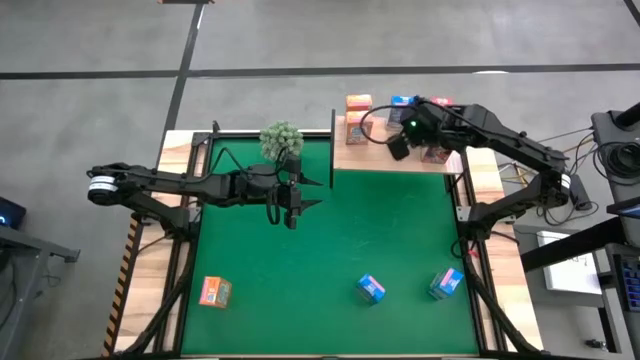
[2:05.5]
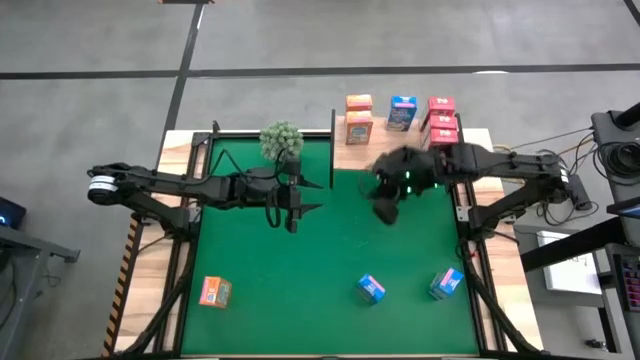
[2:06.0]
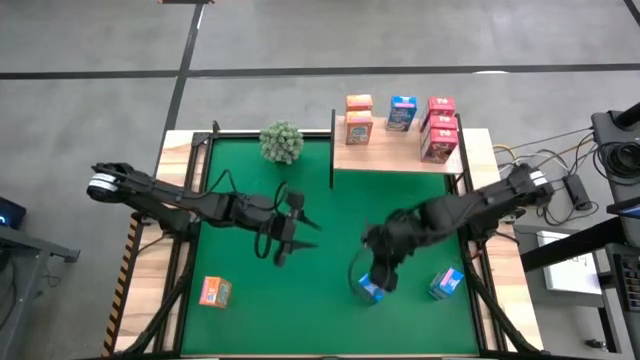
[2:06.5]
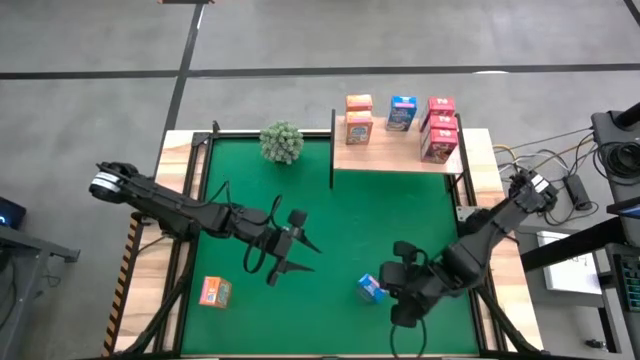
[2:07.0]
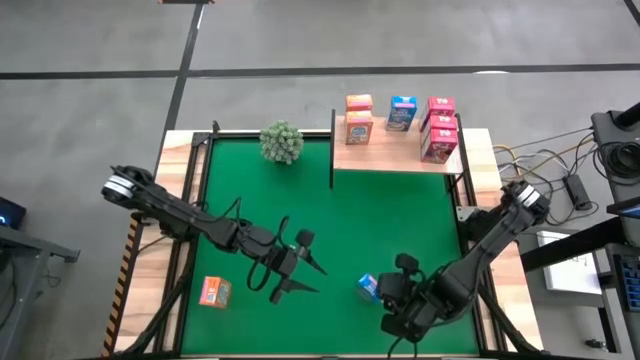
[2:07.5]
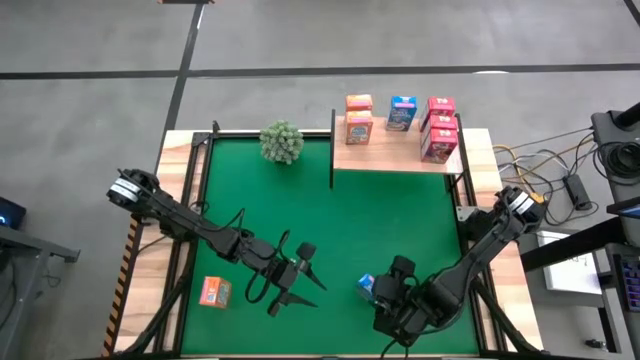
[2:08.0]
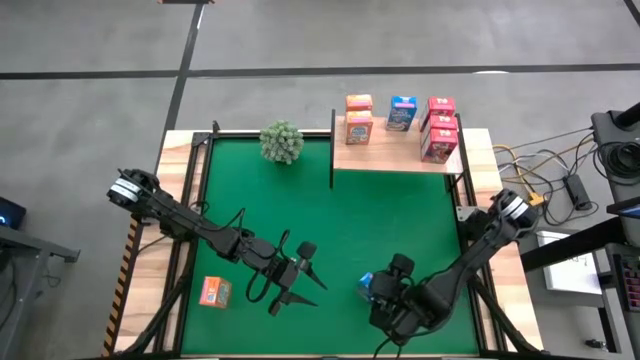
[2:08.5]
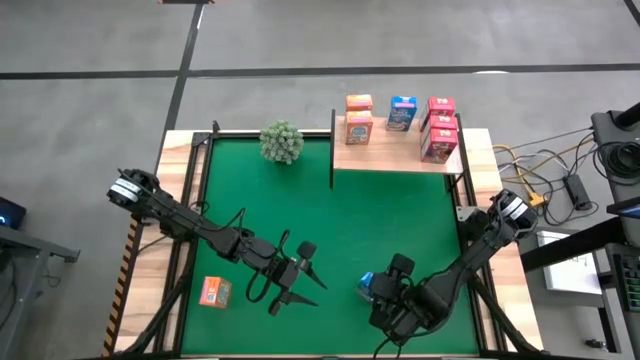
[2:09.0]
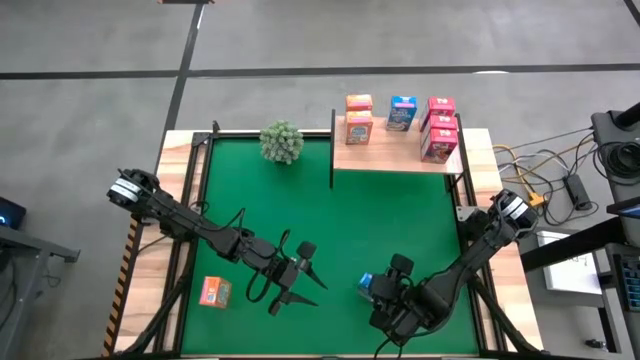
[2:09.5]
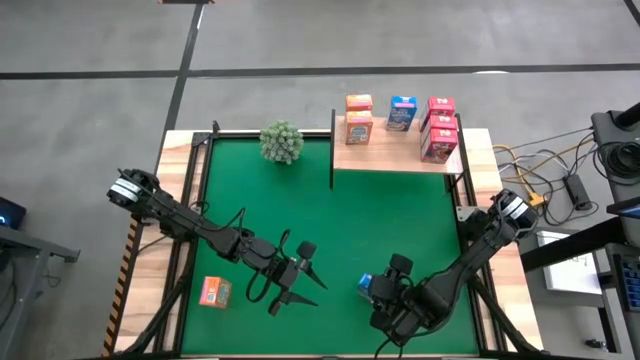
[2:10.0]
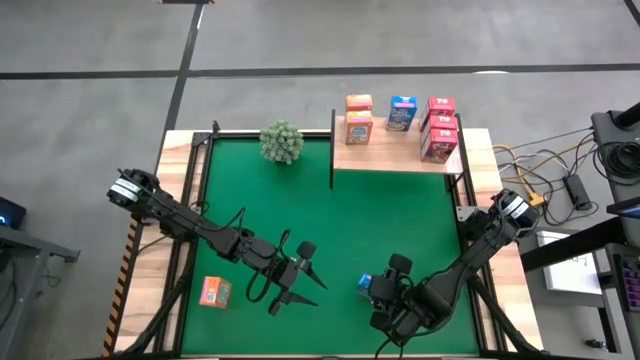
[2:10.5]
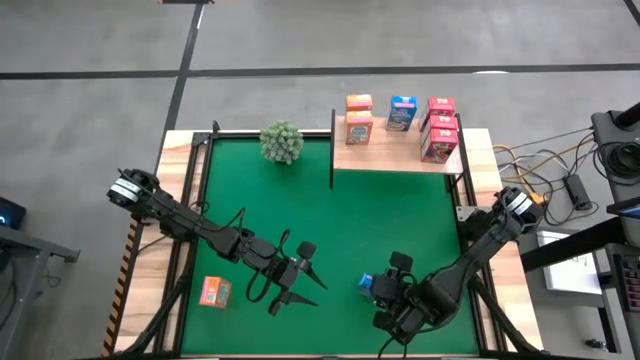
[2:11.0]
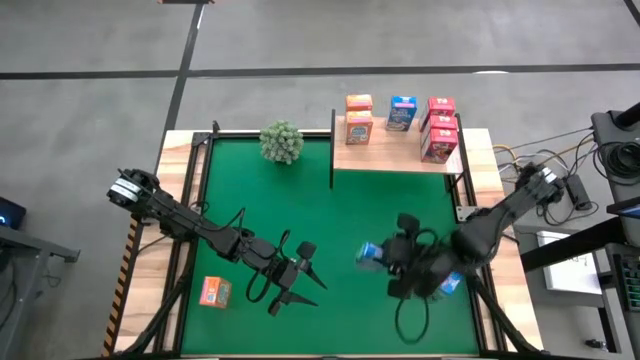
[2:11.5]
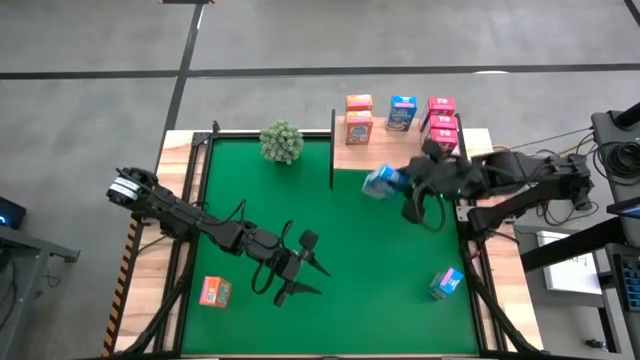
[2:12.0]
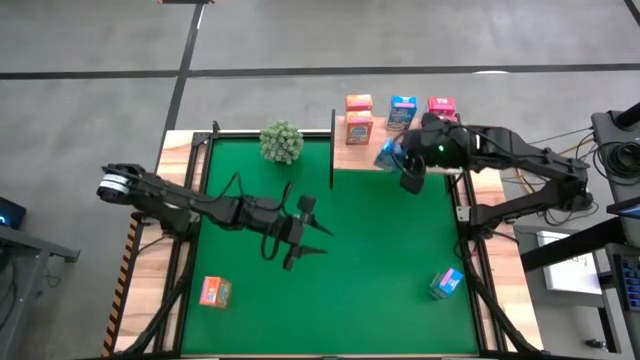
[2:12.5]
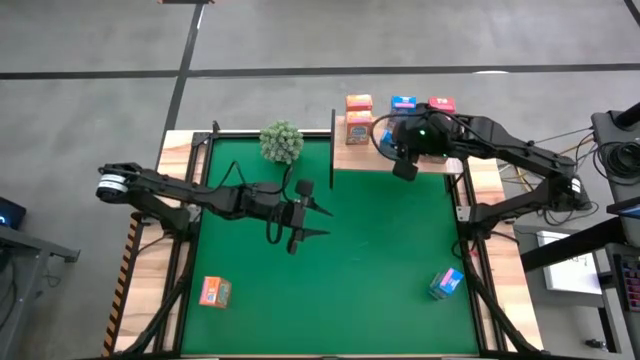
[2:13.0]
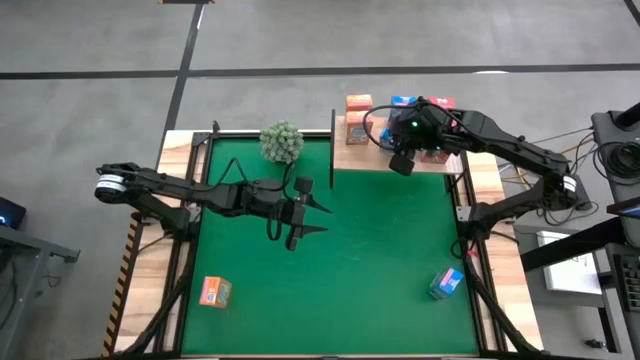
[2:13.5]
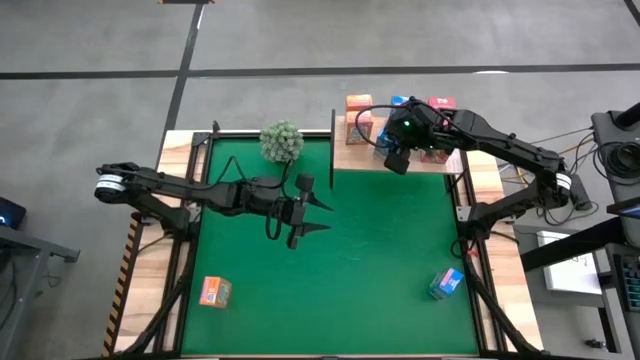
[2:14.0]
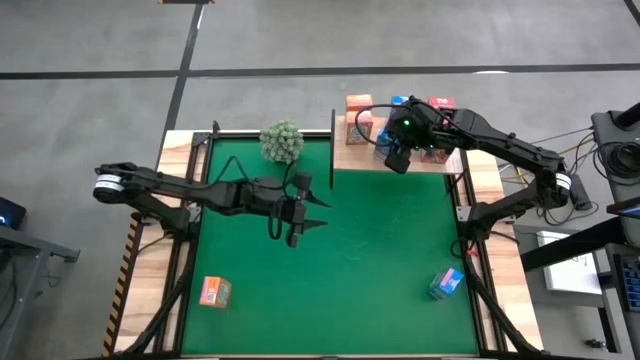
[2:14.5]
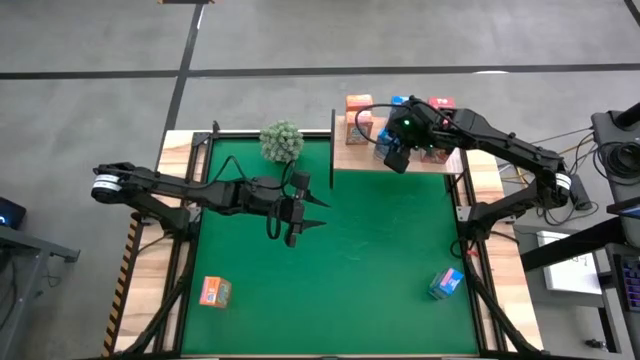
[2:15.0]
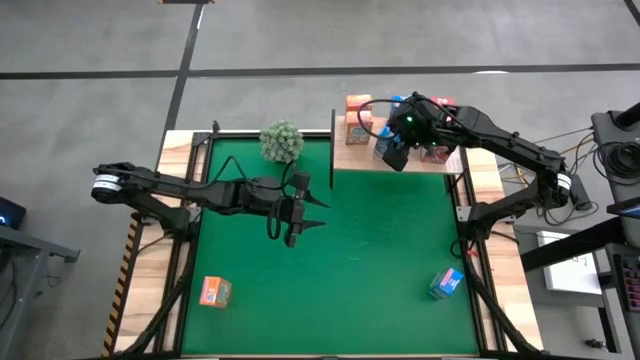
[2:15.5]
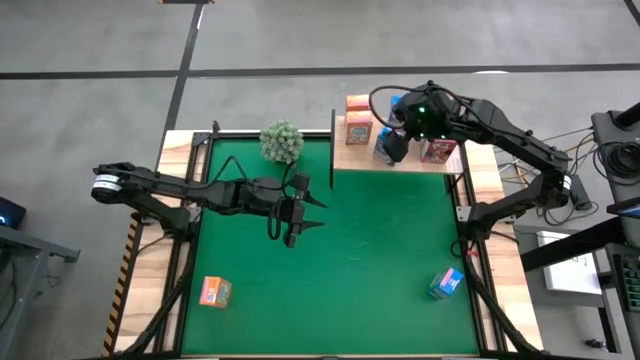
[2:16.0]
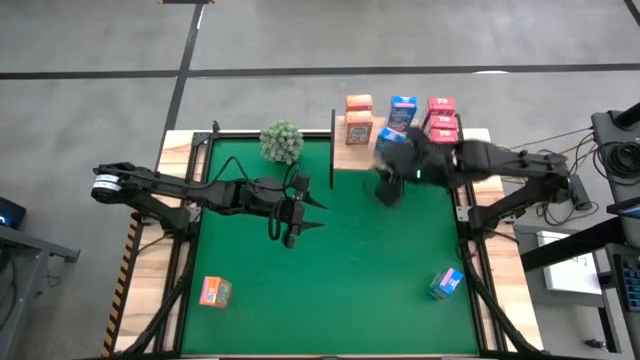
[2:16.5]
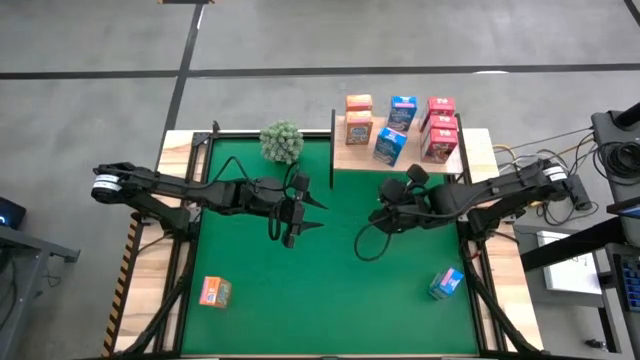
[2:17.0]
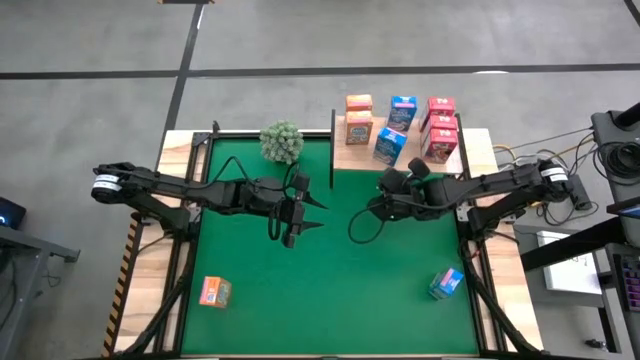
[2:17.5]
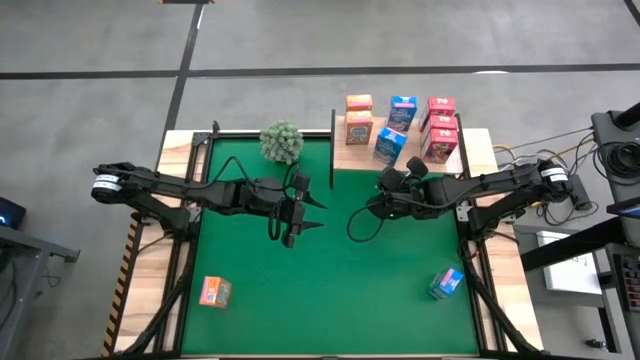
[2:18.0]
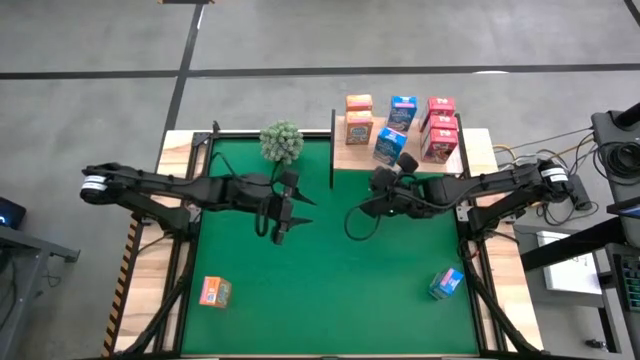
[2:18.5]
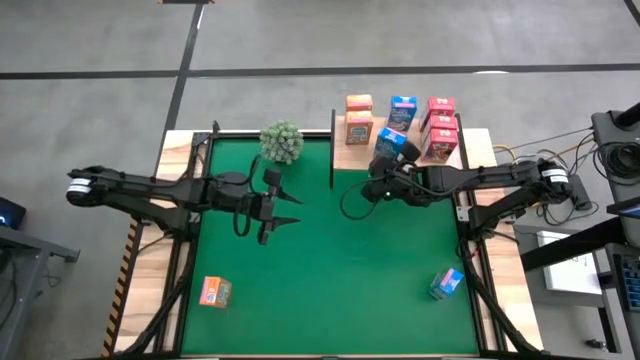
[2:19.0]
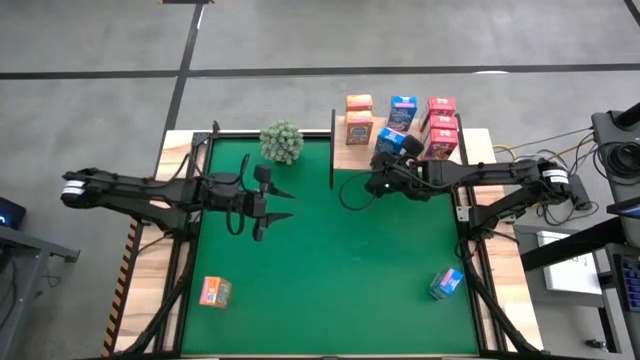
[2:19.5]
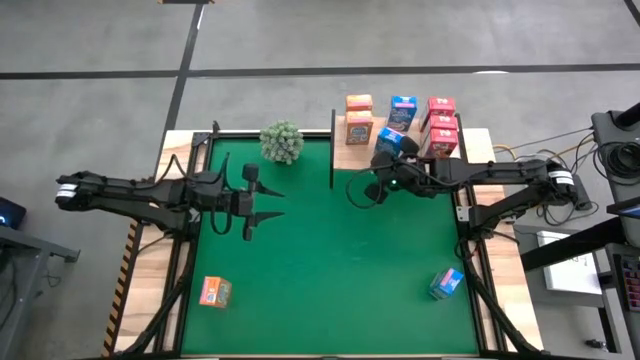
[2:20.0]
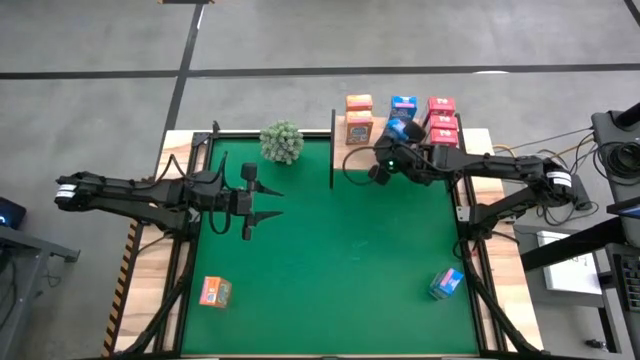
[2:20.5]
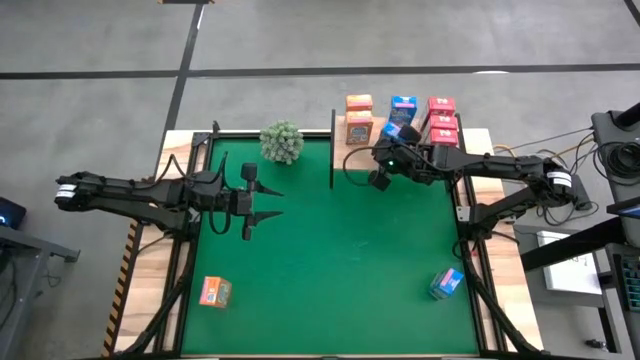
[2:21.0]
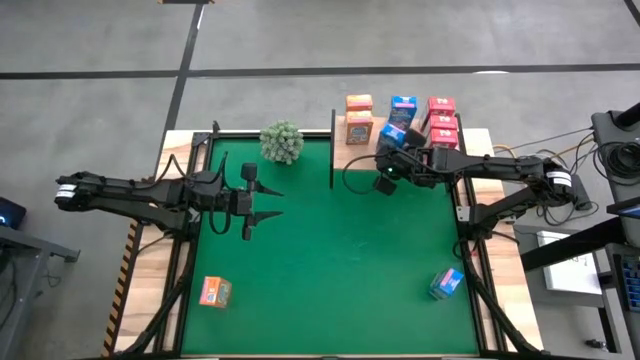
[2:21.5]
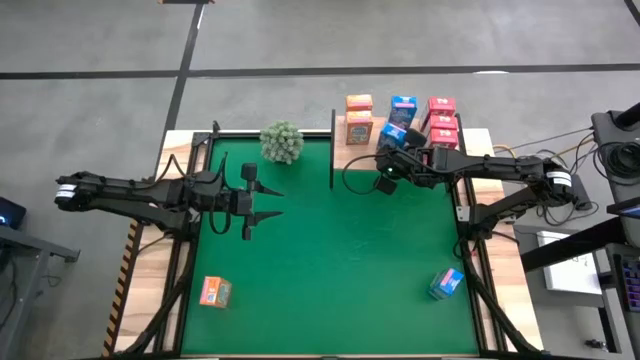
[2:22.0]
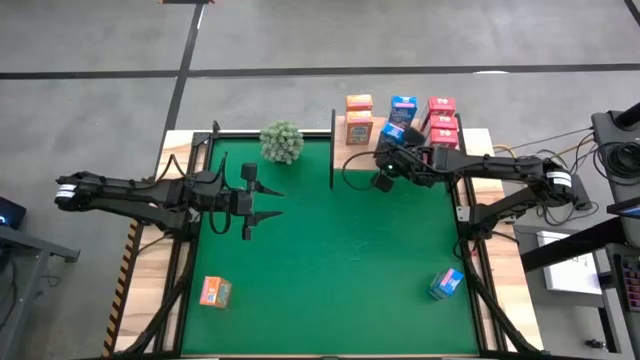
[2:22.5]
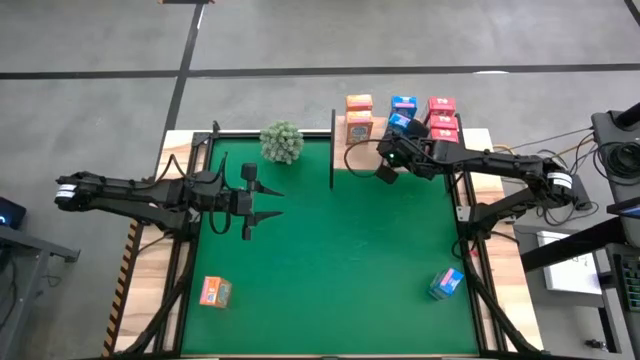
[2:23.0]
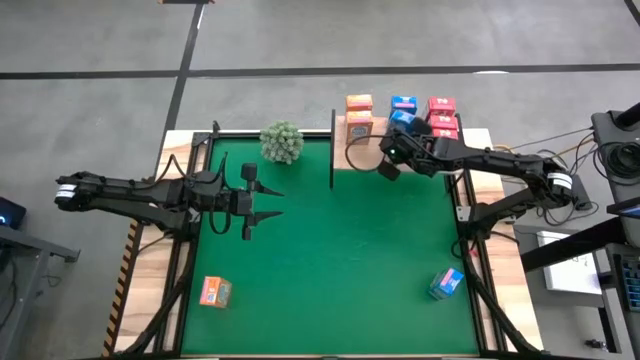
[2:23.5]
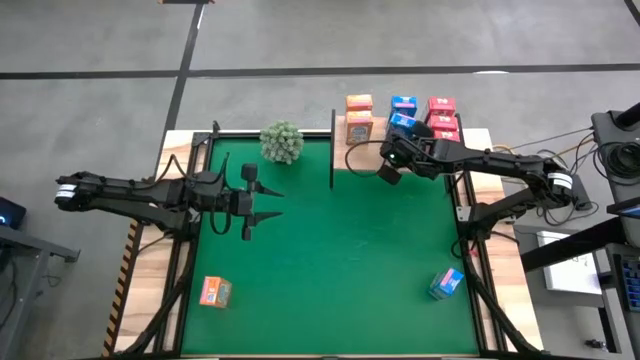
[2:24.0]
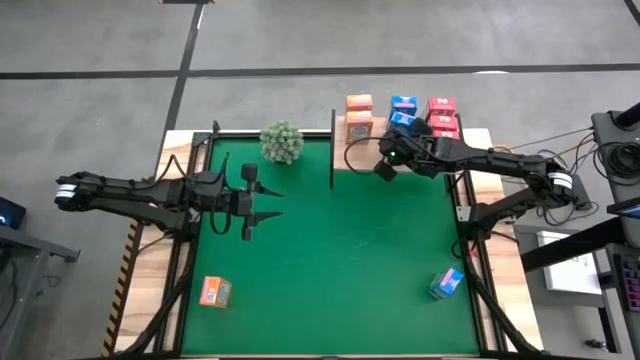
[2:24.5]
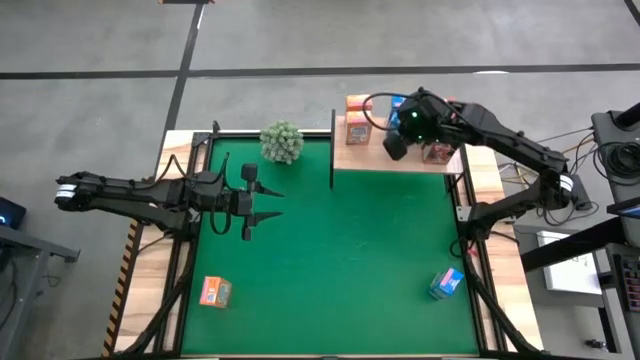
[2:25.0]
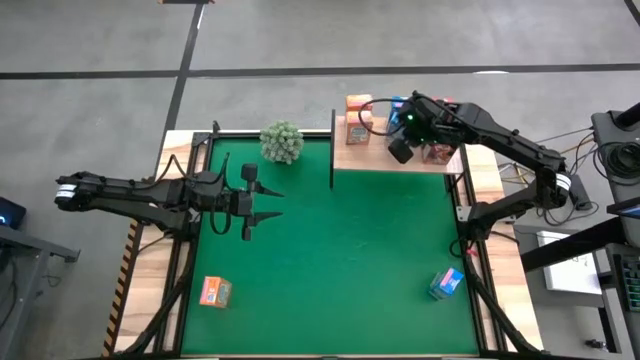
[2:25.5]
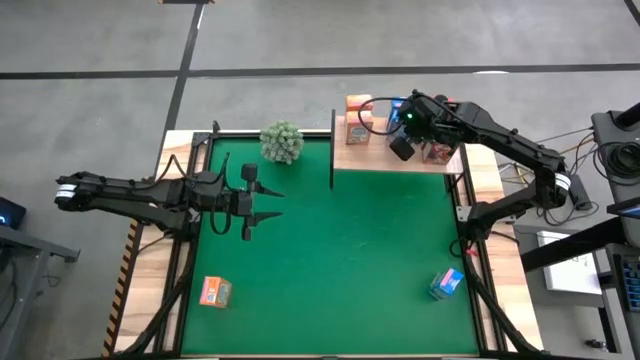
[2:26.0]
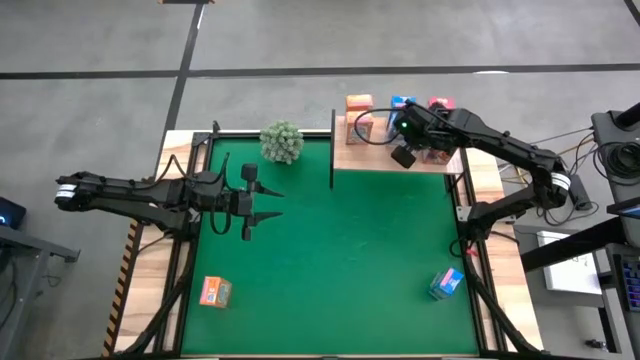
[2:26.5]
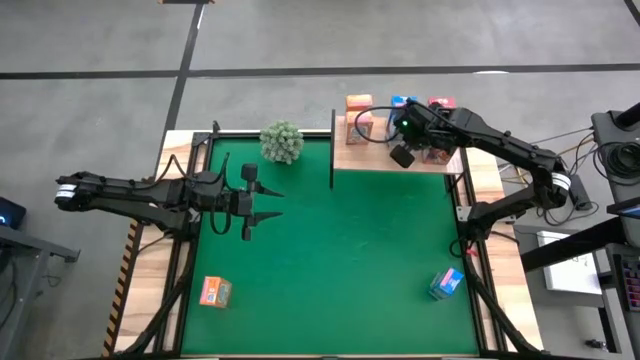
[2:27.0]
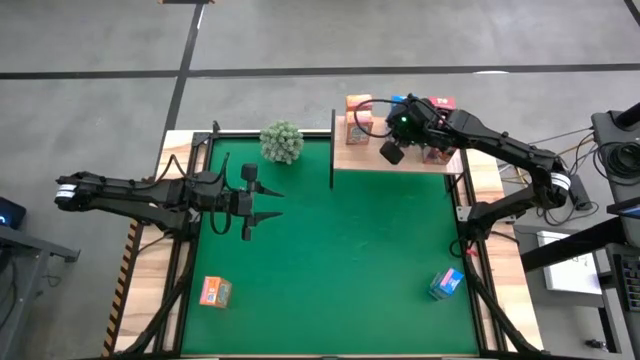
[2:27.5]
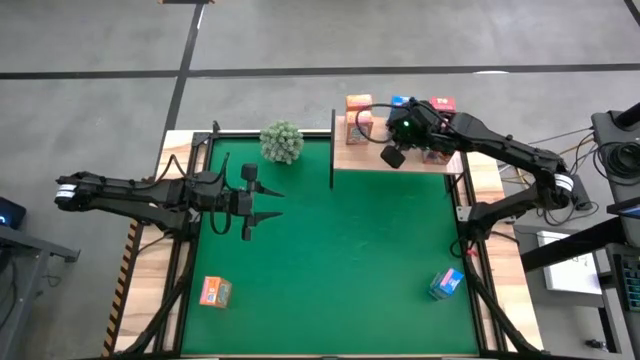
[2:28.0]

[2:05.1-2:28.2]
Task: Stack cereal on shelf
Put the left blue cereal box on the shelf

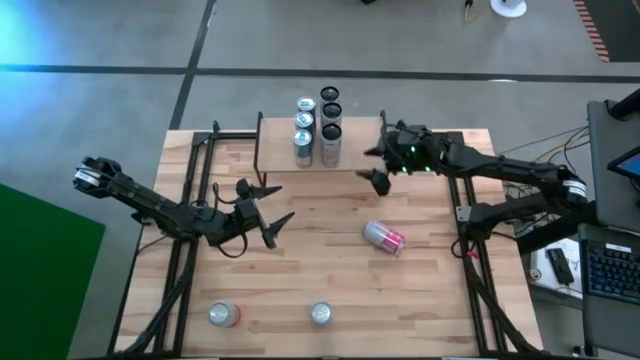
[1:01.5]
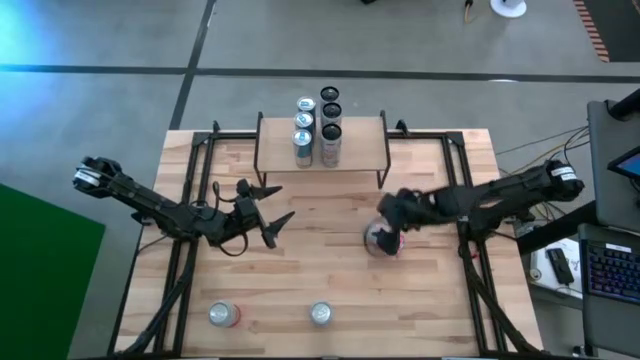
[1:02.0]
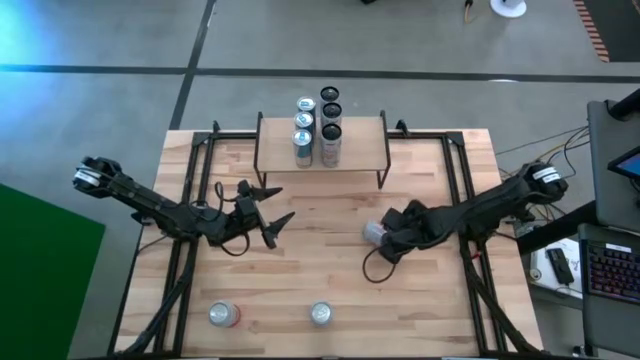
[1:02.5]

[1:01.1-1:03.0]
Task: Place canned beverage on shelf
Put the middle right pink-white soda can on the shelf
